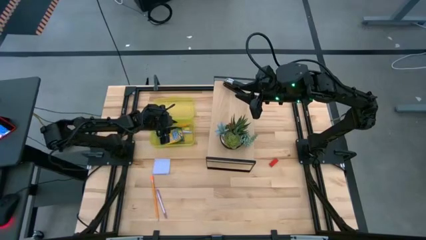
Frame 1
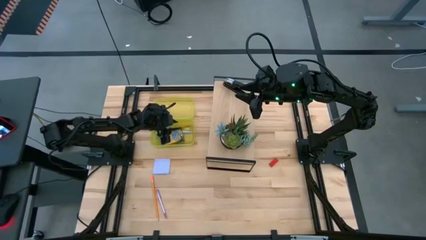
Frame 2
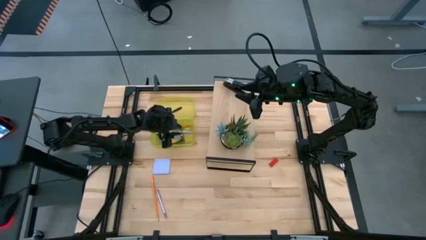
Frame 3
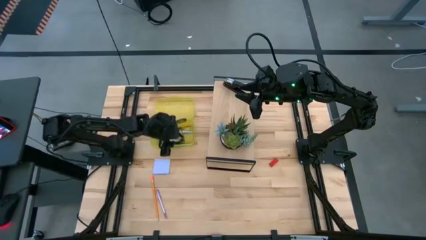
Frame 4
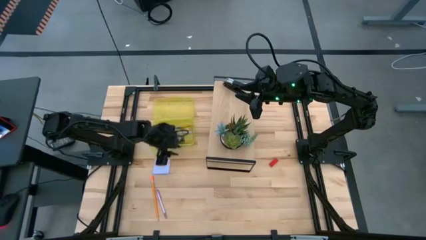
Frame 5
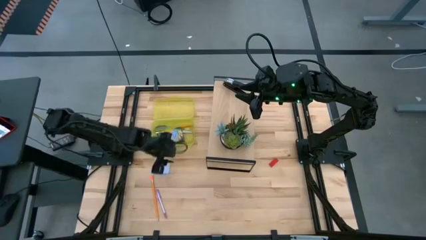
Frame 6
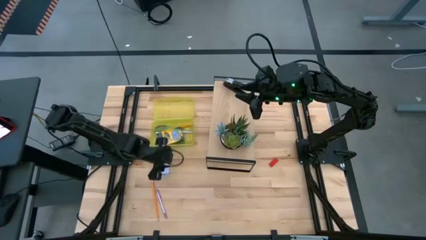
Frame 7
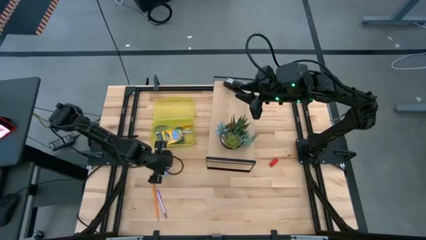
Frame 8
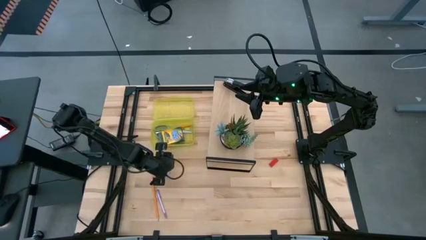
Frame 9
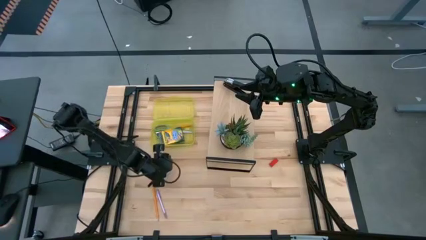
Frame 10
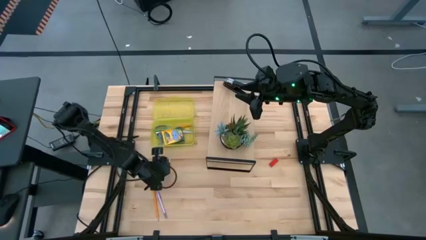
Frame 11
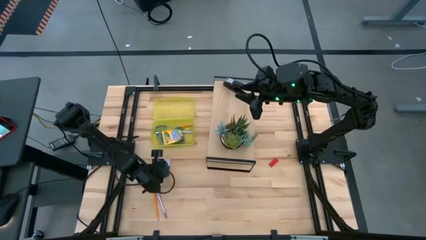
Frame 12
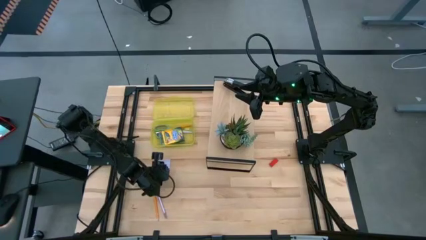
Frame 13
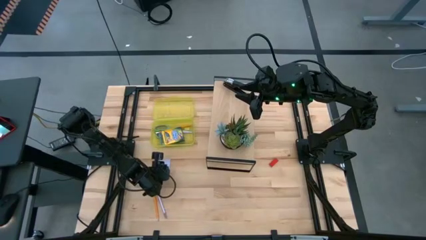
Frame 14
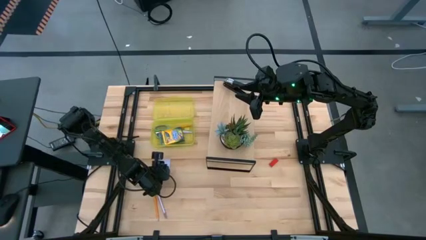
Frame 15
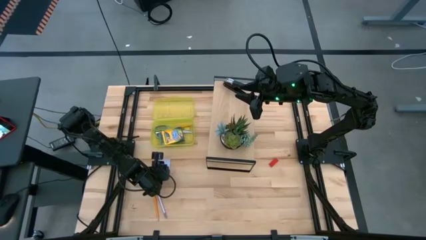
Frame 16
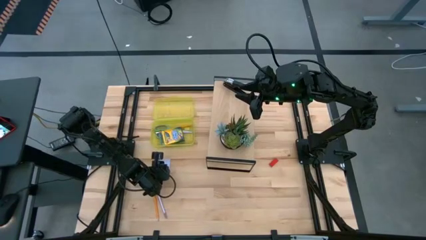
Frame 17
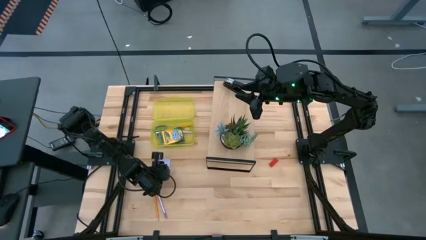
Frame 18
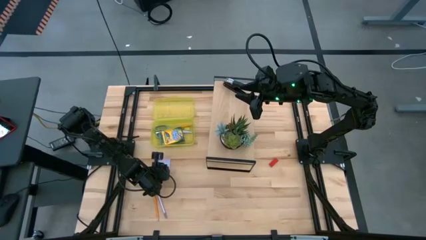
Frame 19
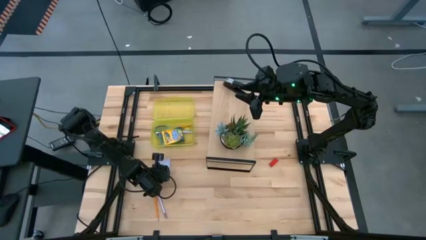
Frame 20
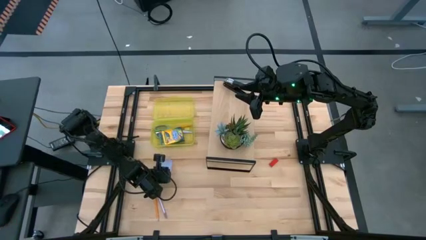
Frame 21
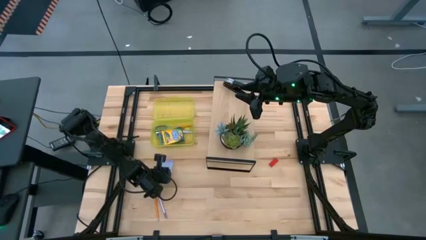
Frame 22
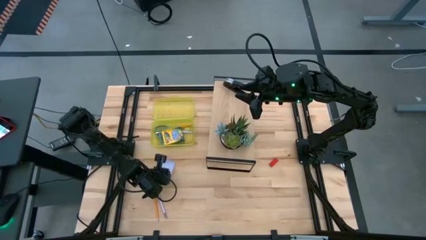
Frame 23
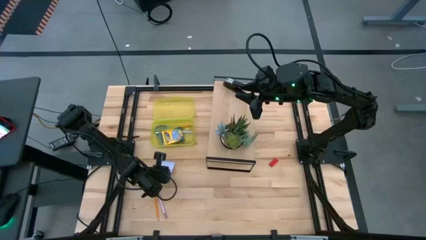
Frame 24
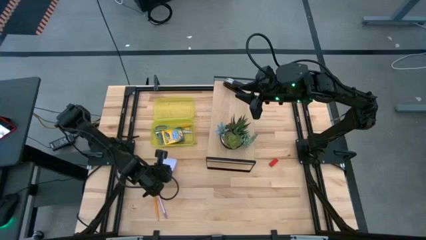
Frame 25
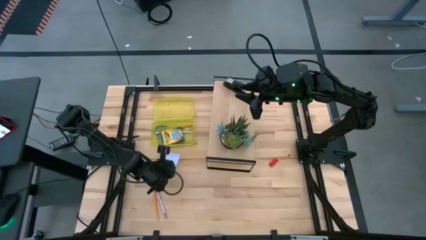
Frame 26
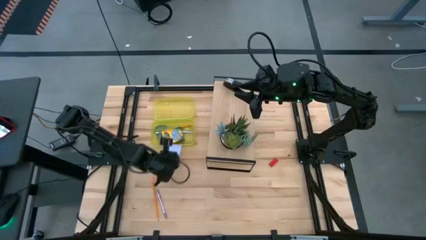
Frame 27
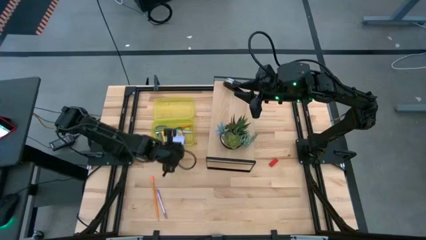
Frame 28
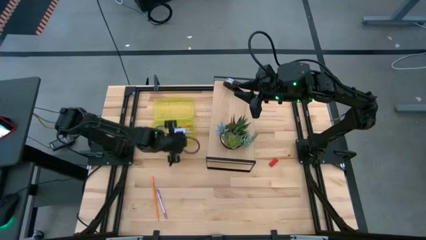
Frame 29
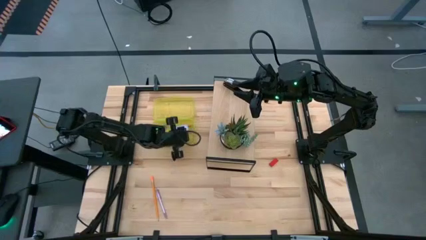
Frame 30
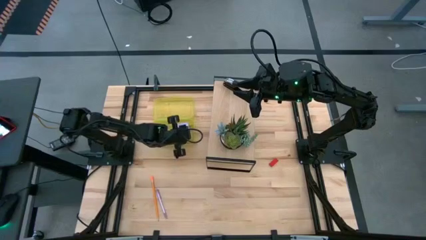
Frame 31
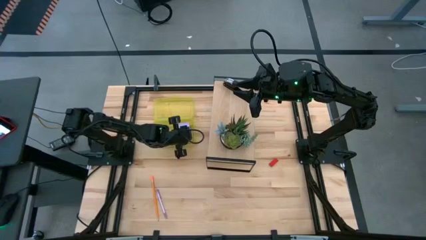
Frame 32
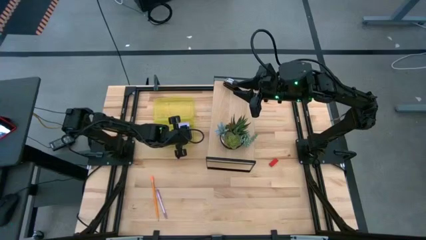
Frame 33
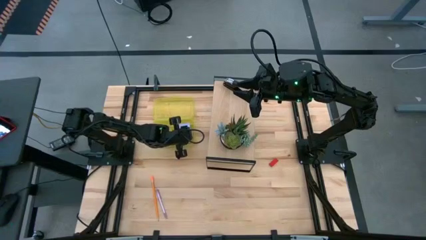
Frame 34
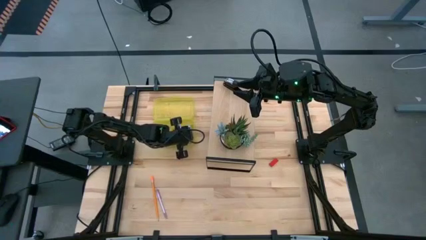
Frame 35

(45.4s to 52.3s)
Task: Pack school essentials
Put the purple sticky note into the yellow supply box

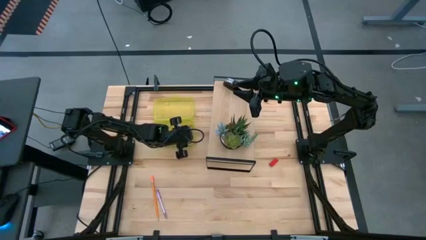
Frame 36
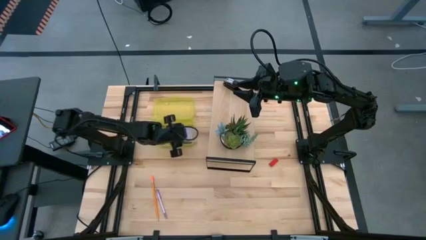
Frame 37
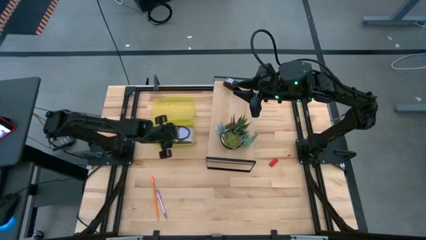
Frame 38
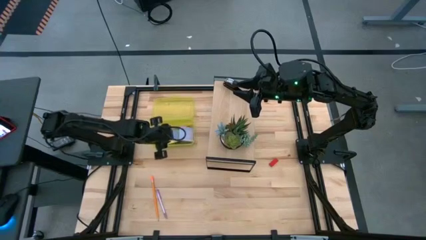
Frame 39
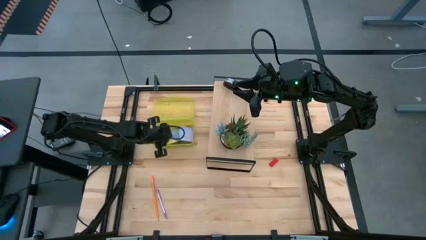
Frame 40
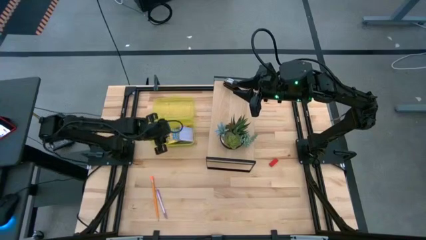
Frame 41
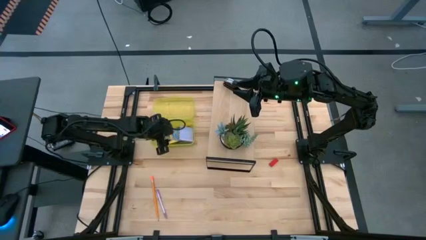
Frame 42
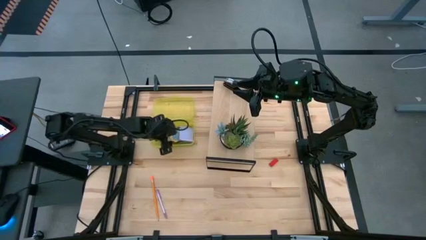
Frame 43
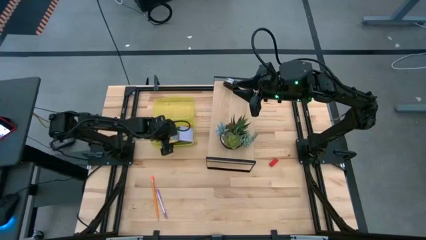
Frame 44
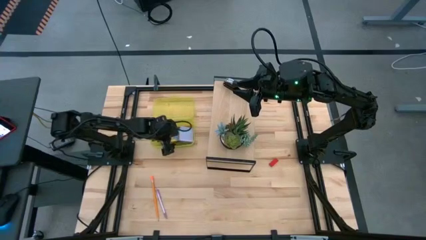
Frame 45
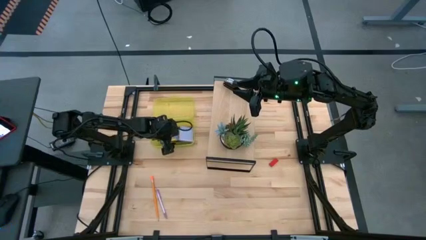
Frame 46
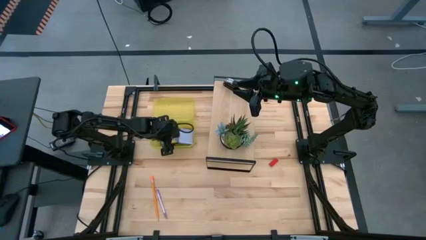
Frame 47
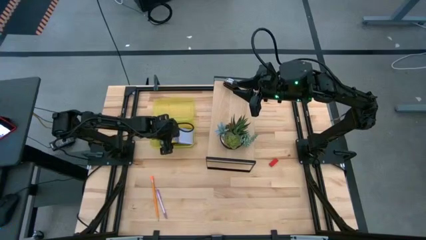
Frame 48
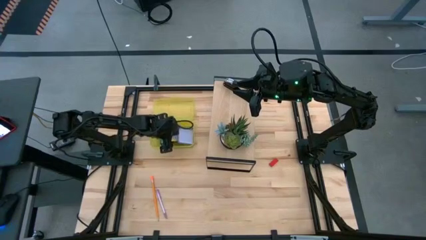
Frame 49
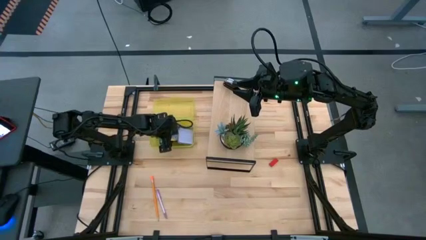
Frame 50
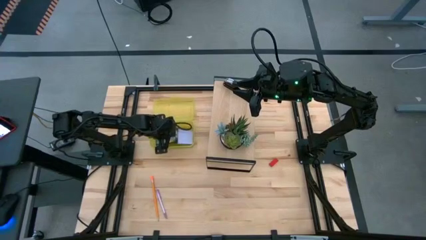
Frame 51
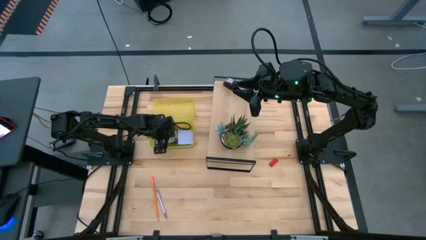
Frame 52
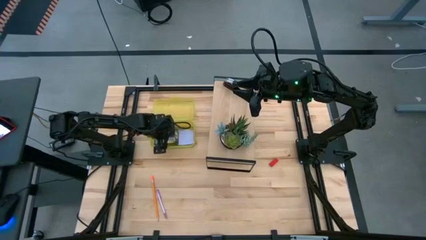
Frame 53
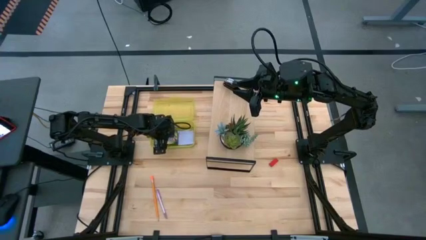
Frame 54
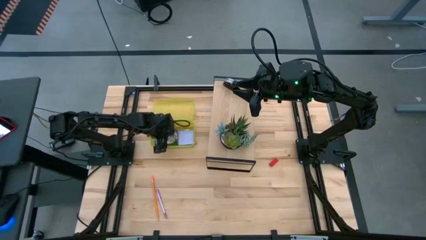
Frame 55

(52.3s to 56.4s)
Adjust the yellow crayon box in the yellow supply box

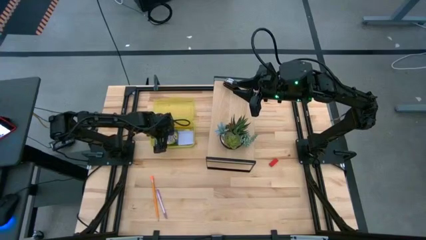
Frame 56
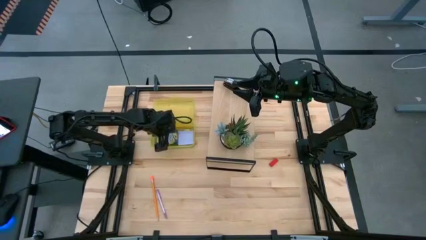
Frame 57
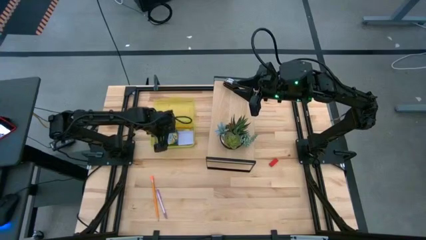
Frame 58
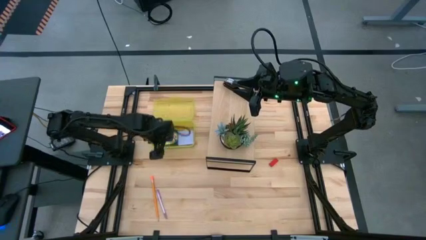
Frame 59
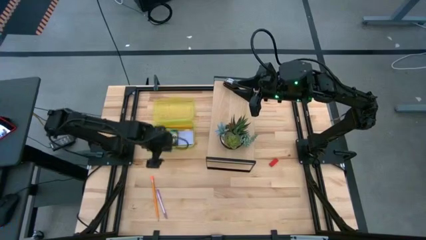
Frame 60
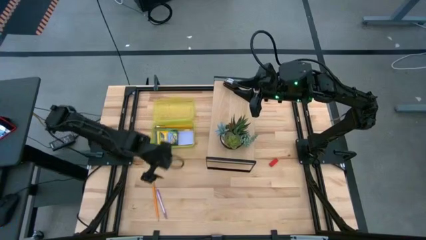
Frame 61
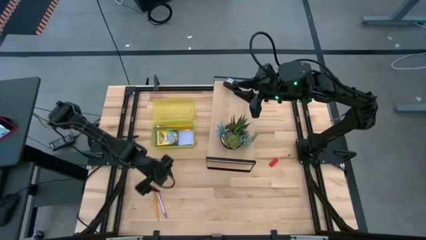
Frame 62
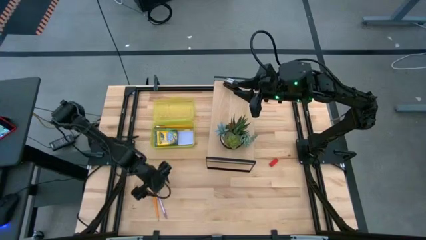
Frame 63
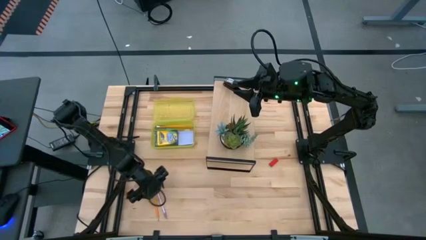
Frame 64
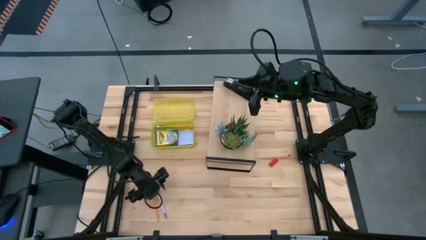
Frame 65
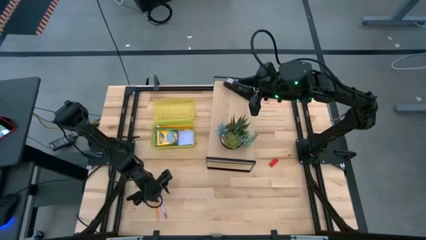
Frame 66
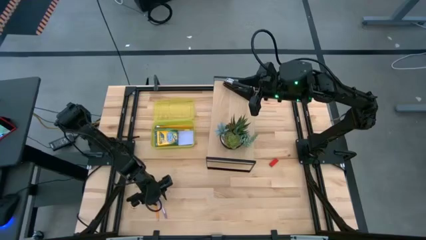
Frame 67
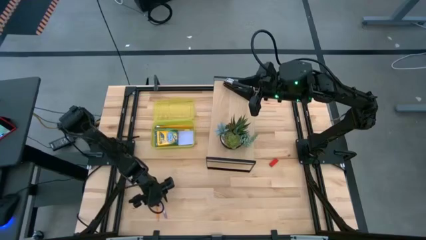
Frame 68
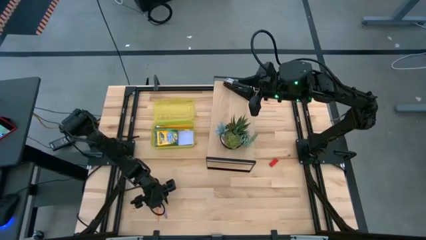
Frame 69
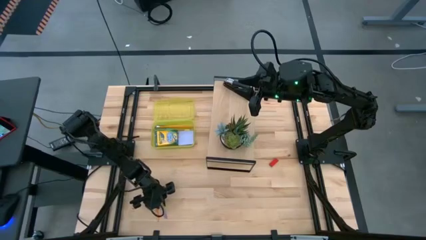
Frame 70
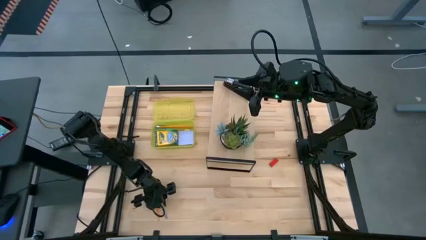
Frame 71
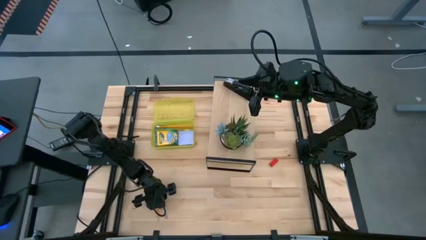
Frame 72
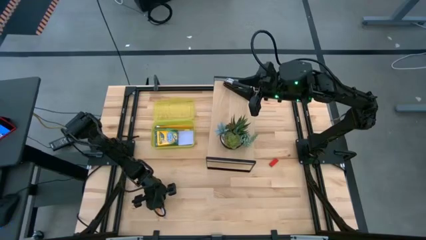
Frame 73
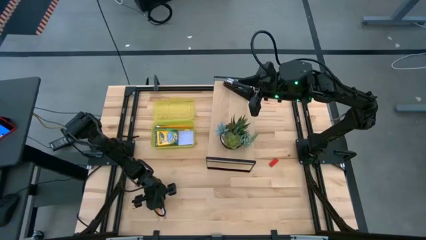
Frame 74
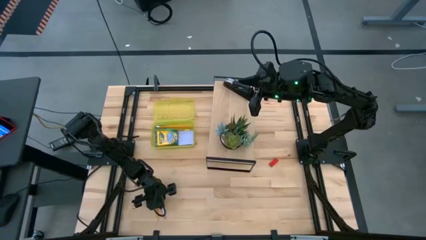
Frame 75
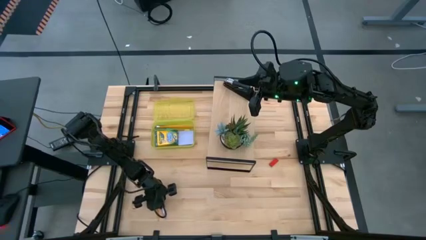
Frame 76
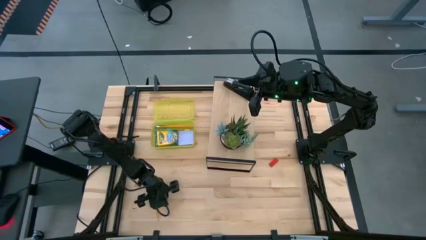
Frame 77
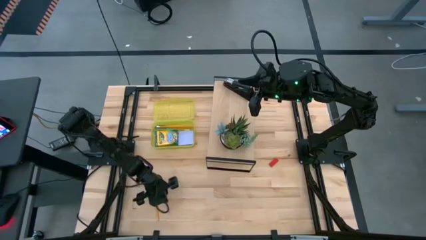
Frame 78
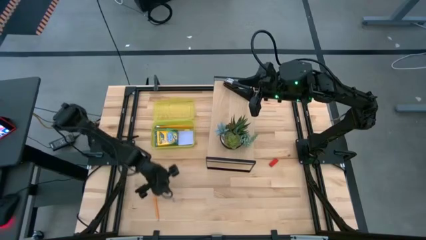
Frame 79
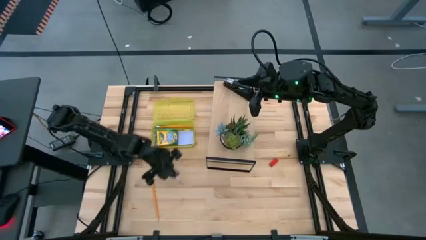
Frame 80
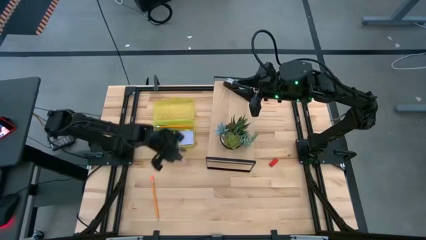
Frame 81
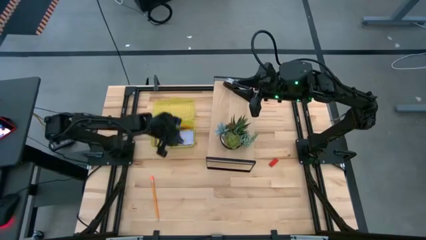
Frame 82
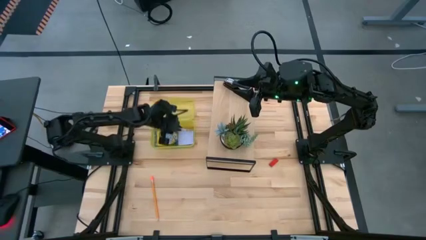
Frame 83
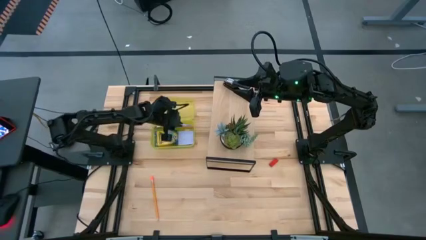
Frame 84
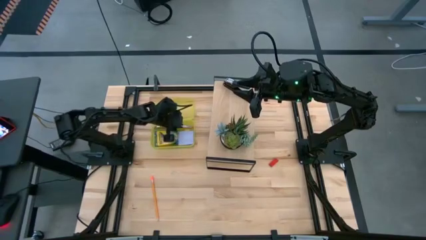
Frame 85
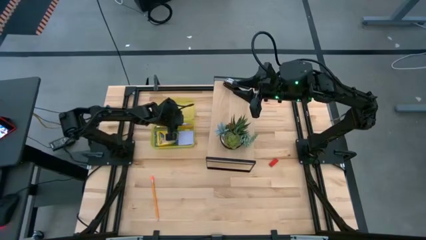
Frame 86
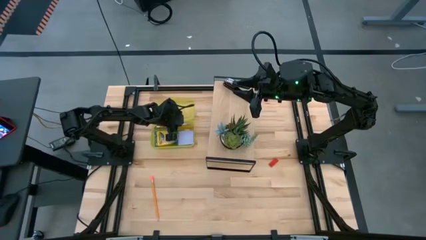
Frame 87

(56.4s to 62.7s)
Put the purple pen into the yellow supply box
